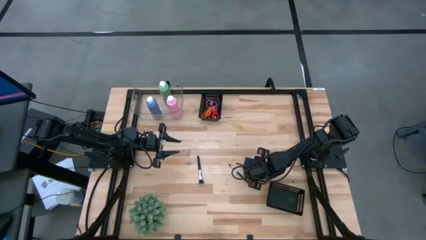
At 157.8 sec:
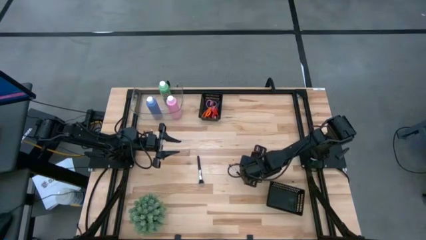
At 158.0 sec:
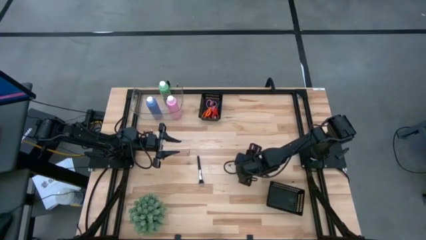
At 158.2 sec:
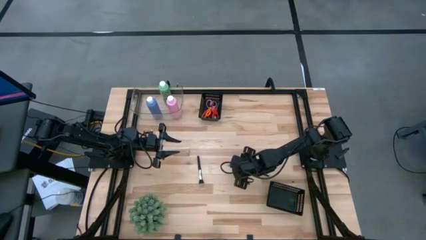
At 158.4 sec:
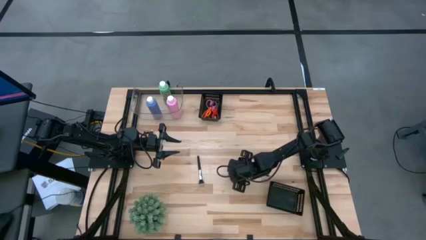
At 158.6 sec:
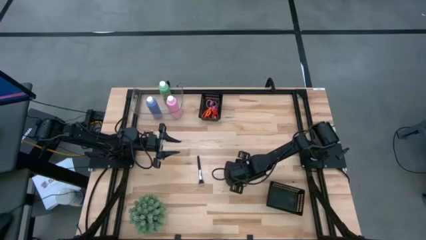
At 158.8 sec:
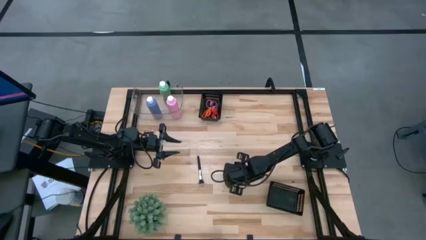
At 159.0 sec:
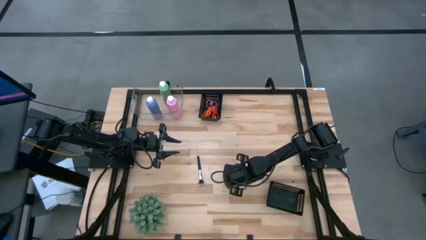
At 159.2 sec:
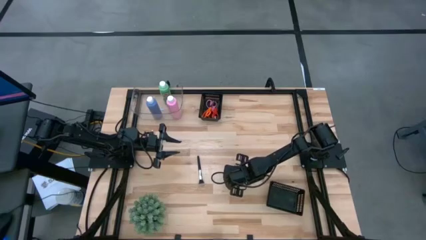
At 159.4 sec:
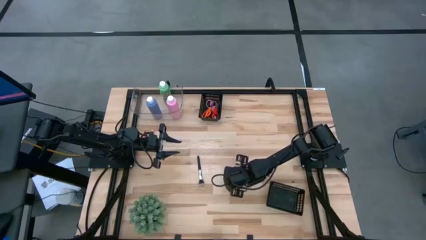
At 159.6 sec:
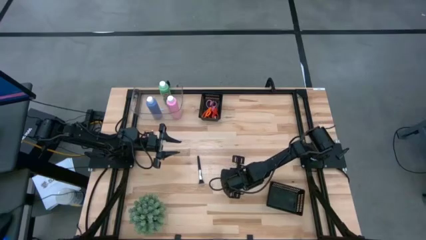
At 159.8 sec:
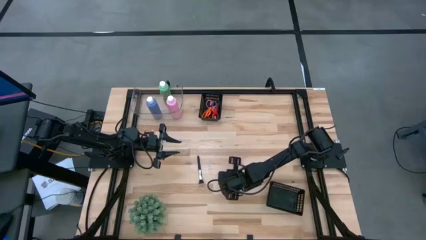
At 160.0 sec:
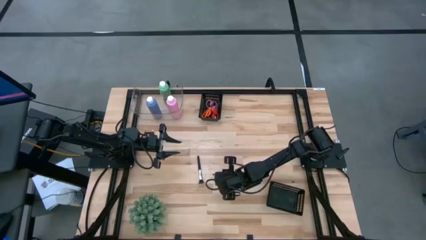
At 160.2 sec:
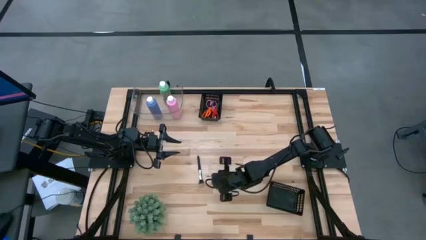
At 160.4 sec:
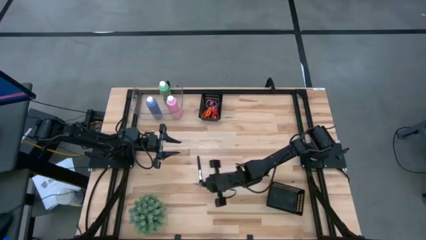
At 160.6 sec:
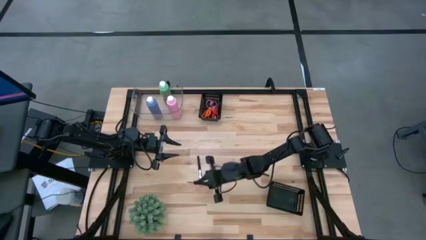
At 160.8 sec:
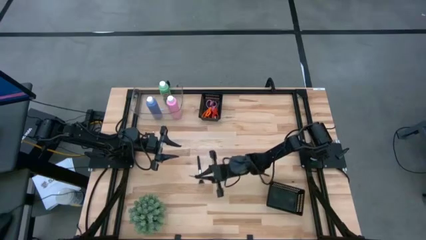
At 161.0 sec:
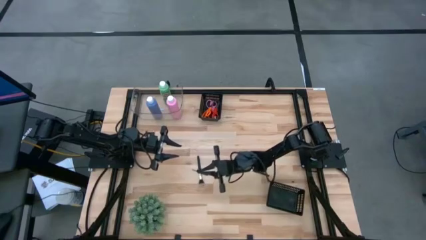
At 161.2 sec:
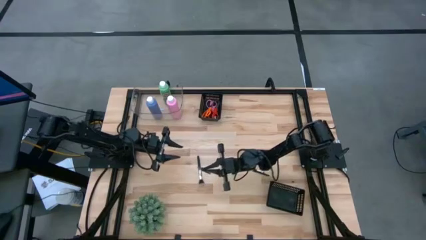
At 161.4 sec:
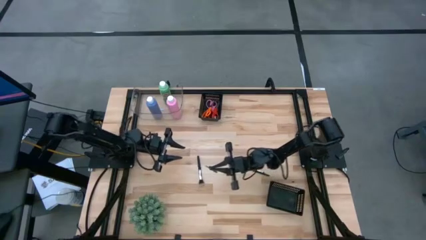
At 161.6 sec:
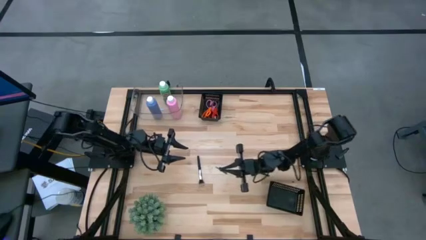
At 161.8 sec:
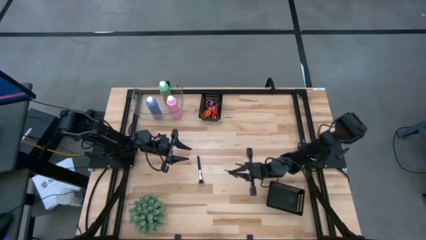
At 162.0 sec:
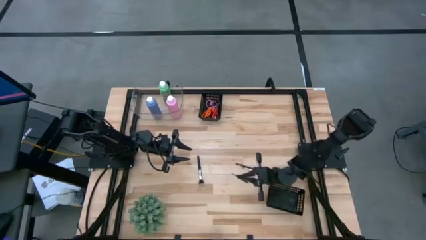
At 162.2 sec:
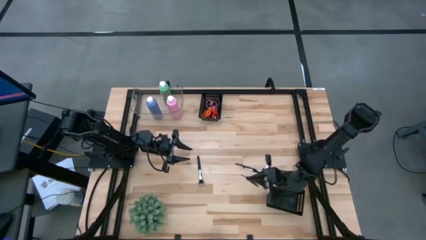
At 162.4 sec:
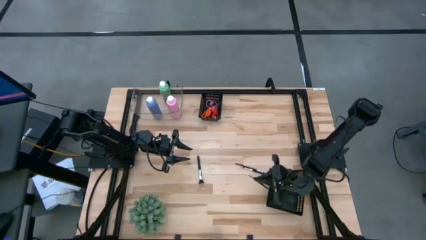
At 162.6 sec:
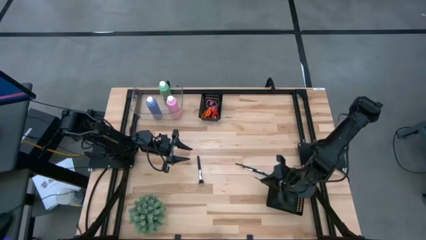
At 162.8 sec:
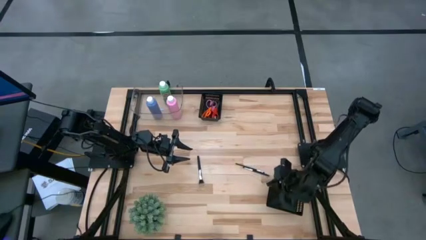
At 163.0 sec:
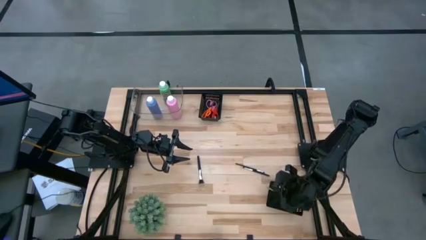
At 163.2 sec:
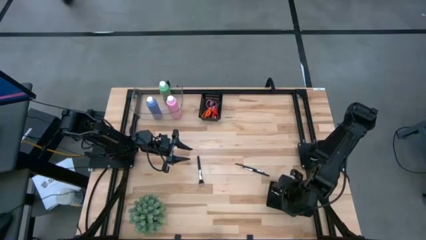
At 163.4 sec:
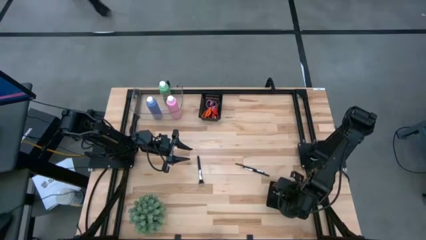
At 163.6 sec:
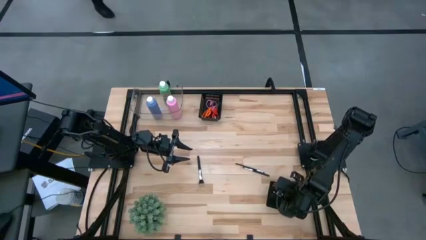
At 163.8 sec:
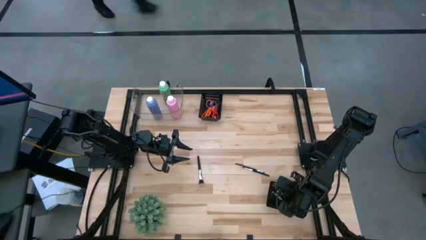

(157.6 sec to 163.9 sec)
Task: Pick & Place Paint Supplies
Put the black paint brush into the bottom black bin

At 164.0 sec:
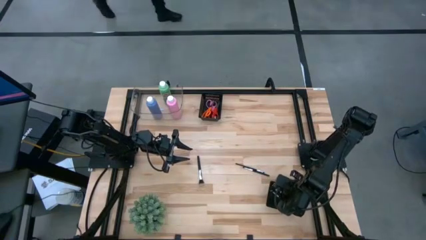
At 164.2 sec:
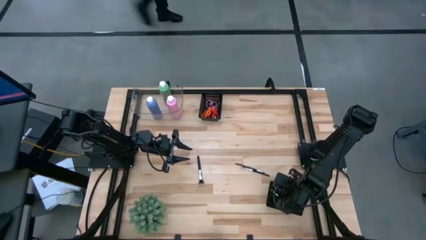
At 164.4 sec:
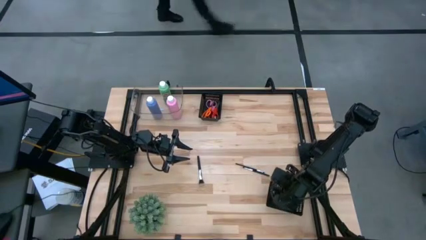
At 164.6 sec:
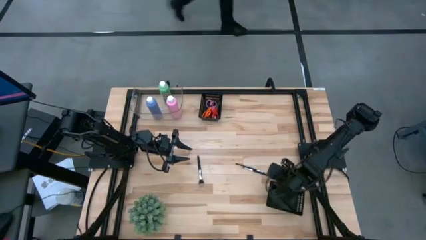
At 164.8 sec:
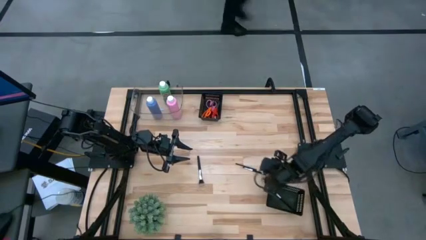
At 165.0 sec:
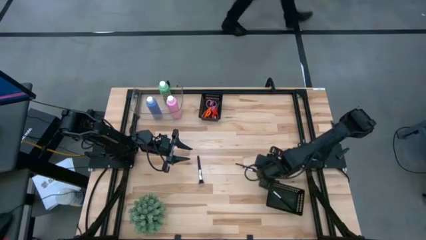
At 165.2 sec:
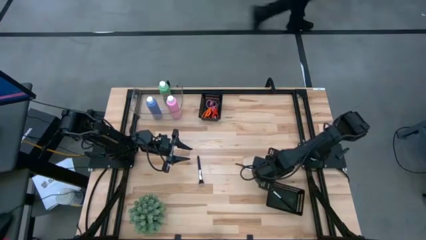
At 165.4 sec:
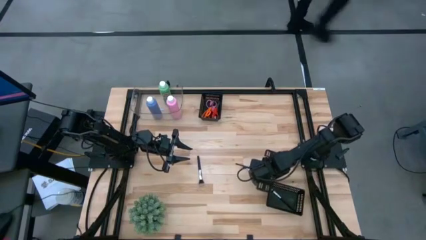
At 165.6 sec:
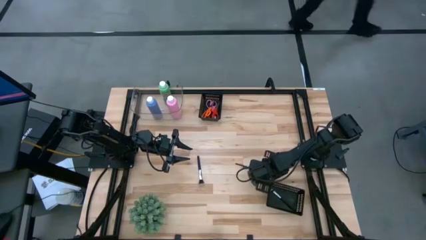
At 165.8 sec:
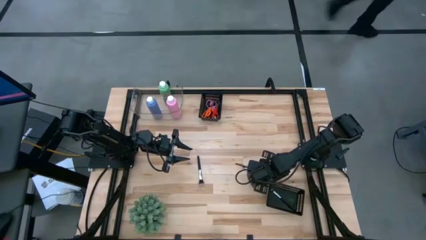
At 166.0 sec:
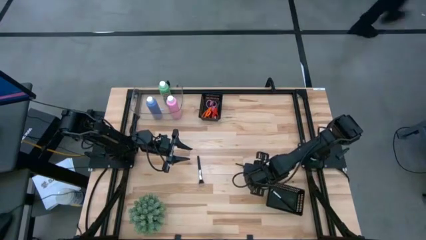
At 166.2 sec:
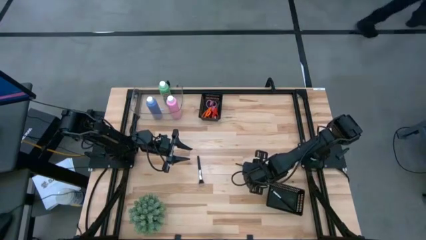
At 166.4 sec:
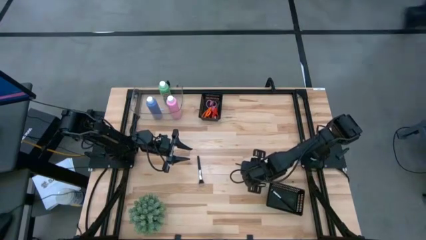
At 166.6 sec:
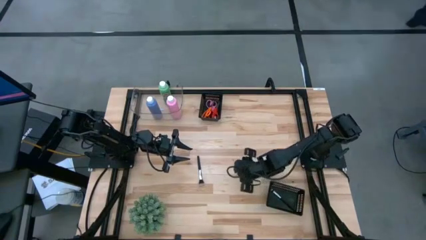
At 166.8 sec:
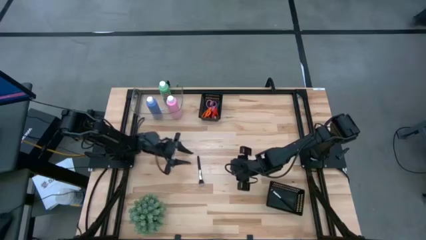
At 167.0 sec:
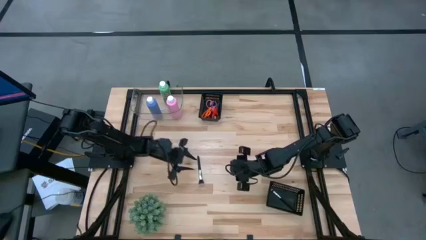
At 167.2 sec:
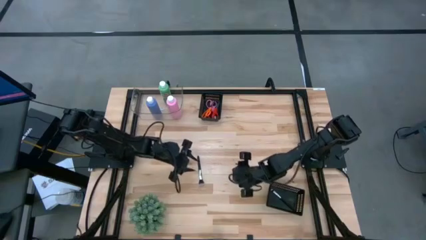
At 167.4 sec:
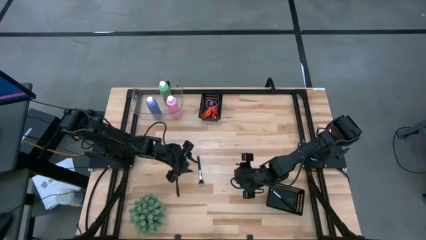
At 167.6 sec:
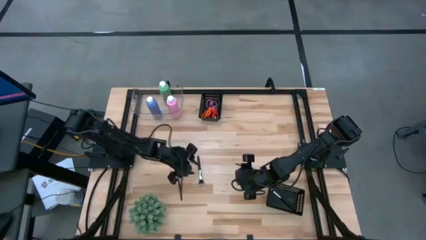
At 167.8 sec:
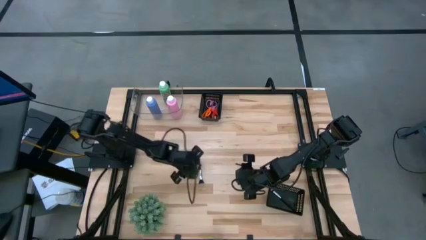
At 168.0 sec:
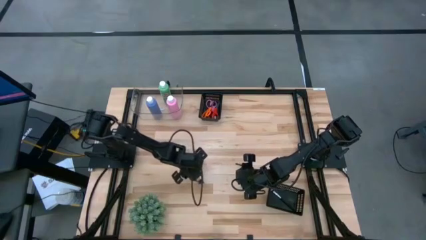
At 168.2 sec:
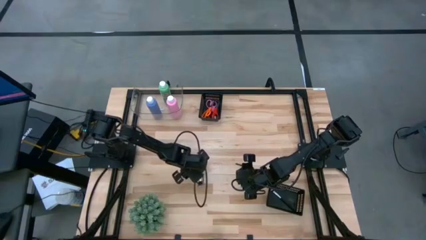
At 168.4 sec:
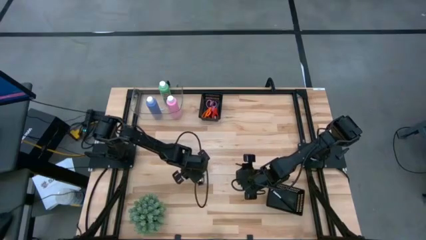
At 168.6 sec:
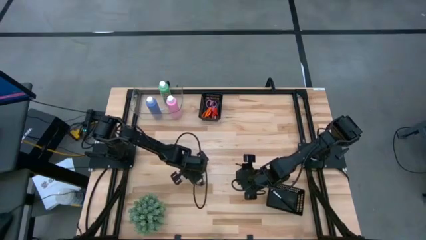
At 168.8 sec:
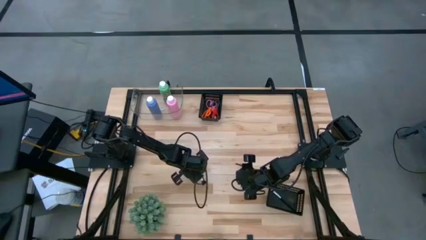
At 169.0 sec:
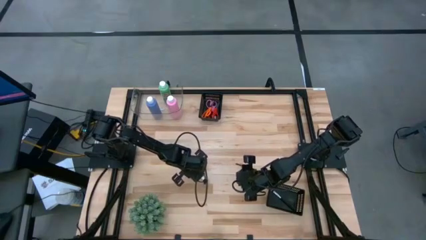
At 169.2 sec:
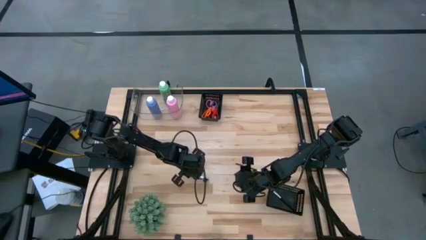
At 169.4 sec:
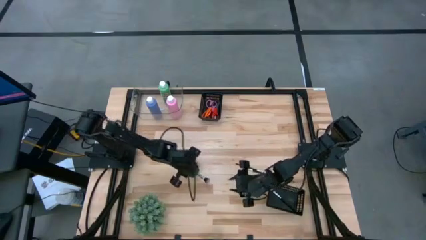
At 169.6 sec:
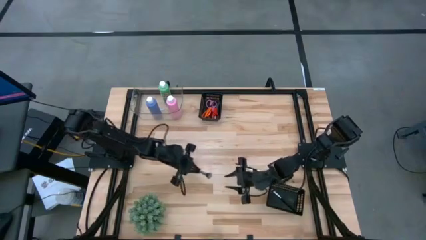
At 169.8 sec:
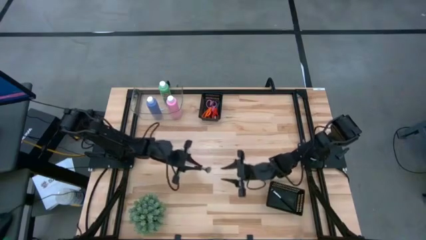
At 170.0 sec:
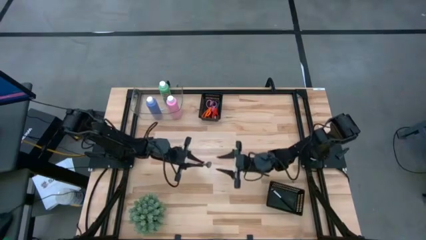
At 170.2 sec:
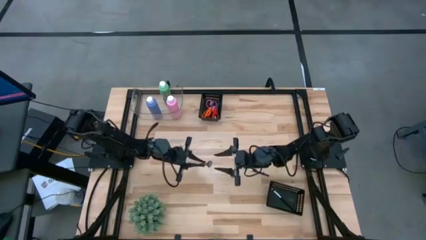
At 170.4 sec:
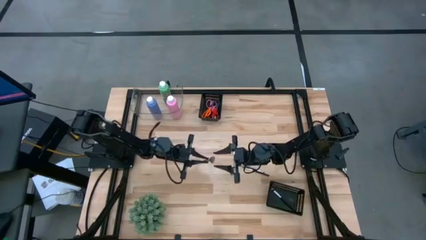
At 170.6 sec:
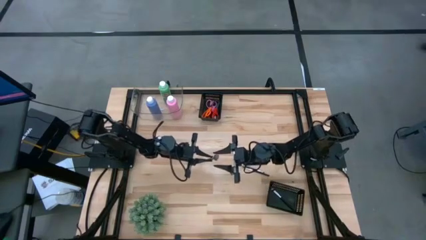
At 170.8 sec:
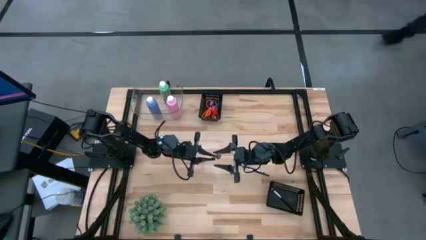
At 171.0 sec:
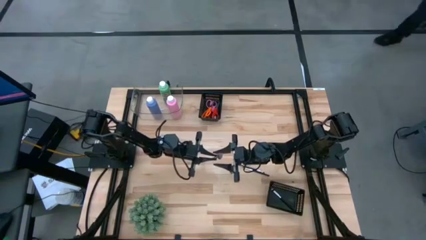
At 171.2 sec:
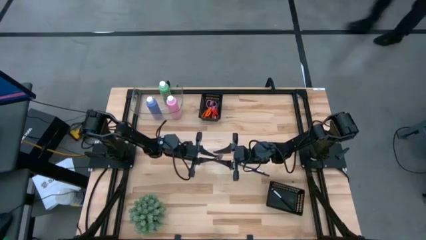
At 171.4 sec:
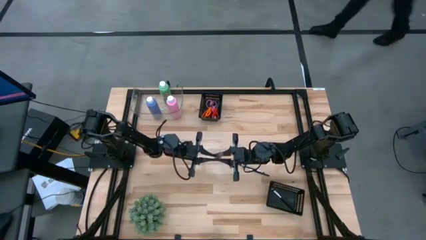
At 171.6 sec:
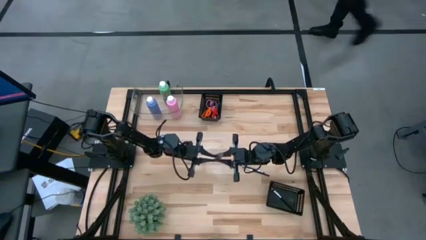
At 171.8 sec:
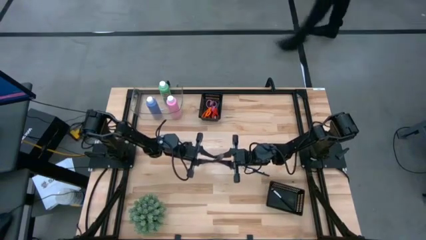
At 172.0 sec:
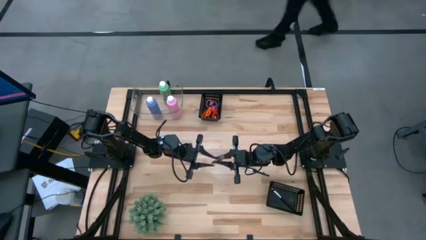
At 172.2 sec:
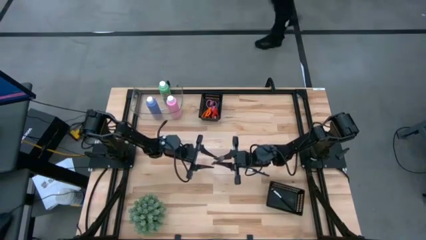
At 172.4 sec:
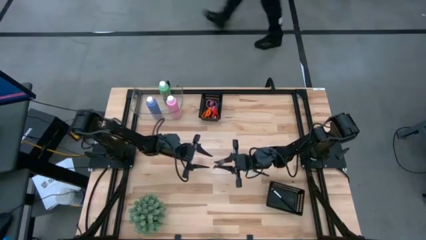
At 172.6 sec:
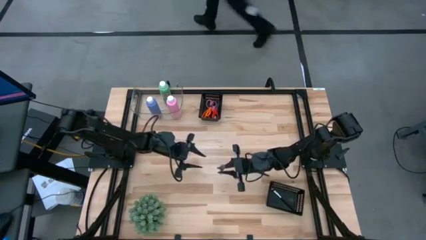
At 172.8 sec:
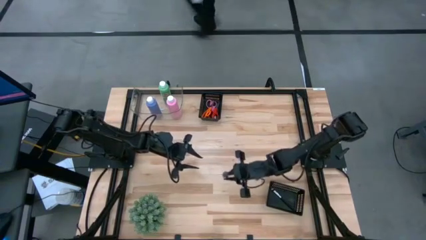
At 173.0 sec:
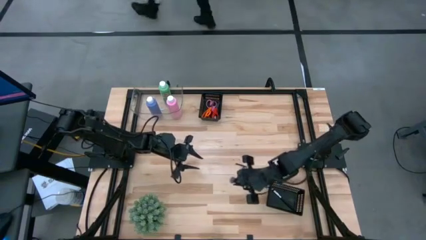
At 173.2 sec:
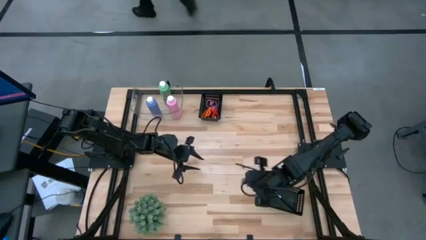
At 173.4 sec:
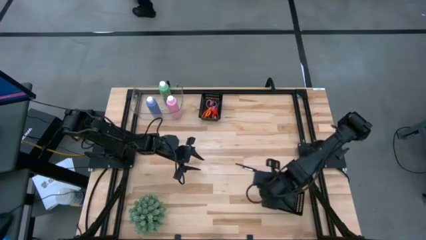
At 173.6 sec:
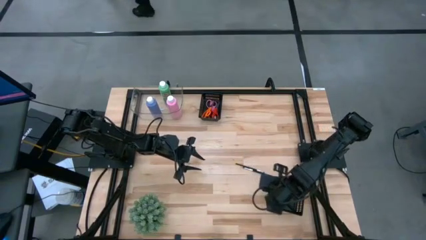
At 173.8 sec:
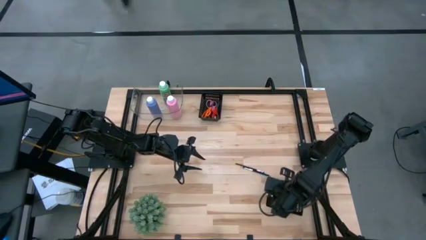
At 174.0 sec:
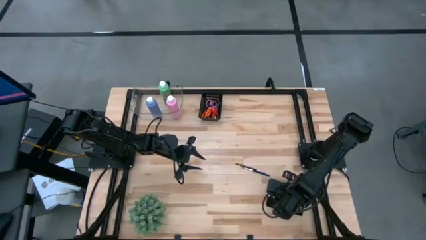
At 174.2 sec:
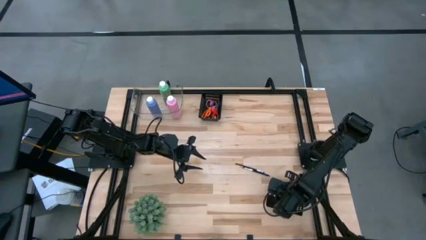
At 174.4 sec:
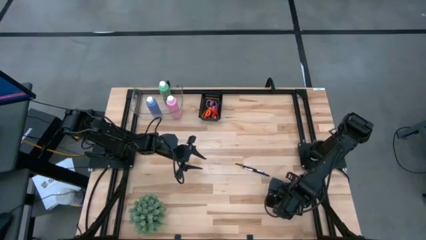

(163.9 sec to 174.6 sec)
Put the black paint brush into the bottom black bin
